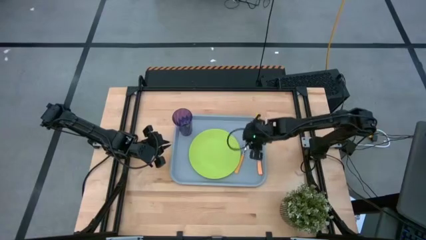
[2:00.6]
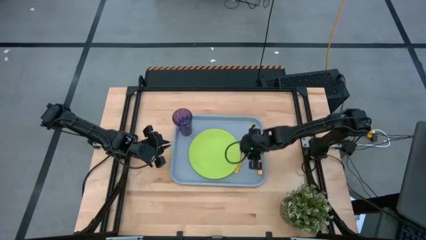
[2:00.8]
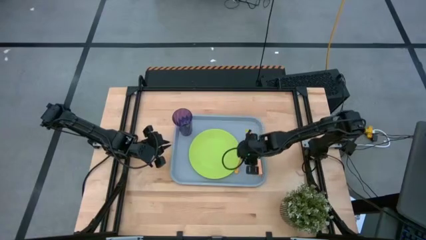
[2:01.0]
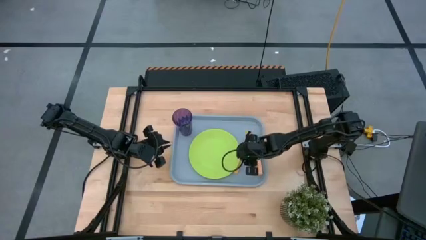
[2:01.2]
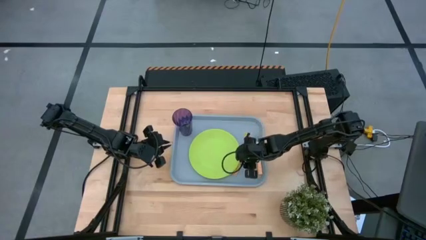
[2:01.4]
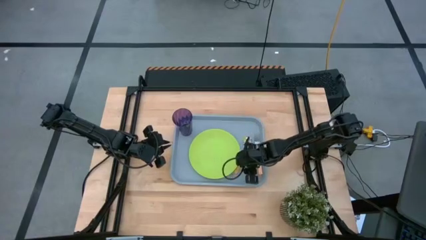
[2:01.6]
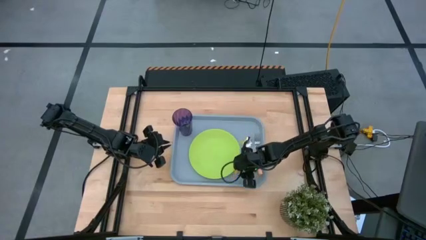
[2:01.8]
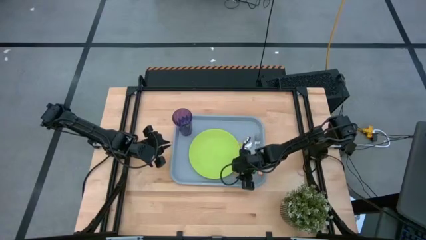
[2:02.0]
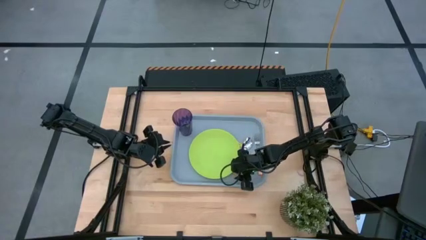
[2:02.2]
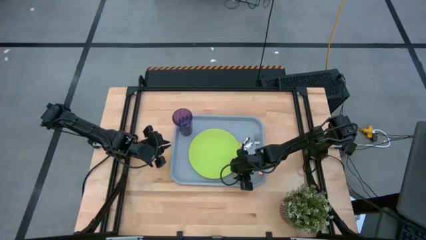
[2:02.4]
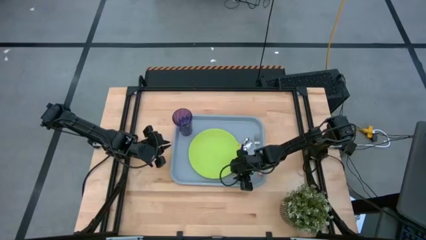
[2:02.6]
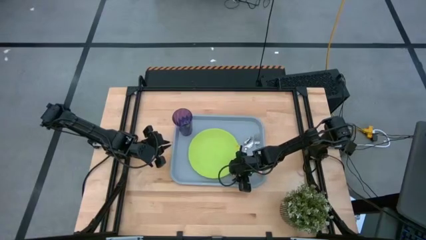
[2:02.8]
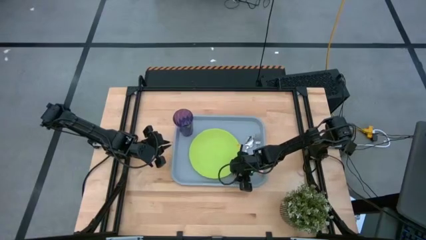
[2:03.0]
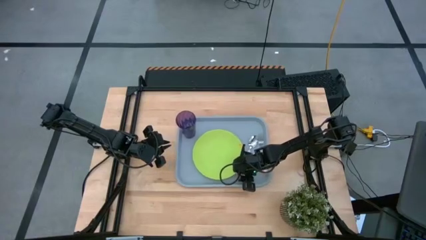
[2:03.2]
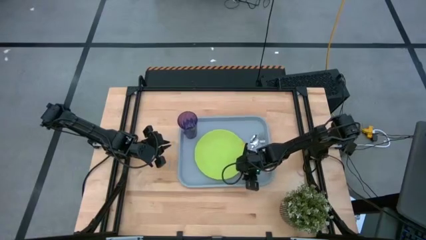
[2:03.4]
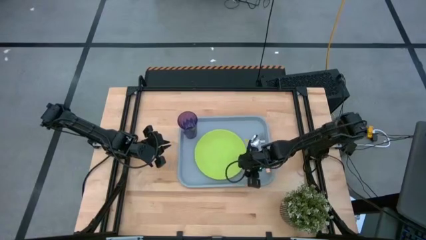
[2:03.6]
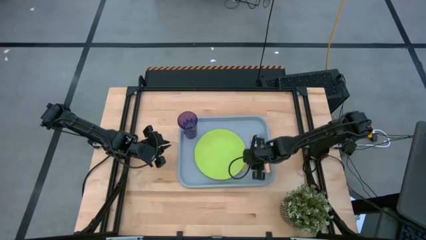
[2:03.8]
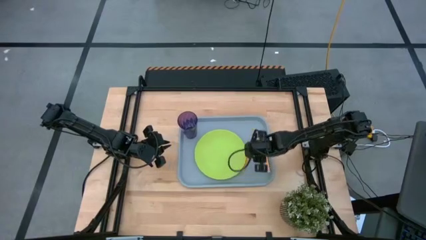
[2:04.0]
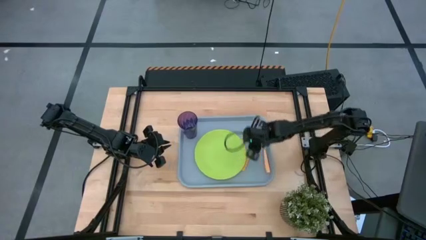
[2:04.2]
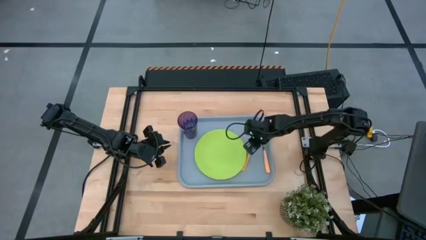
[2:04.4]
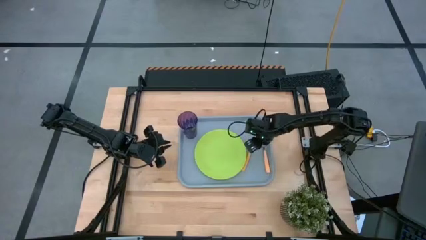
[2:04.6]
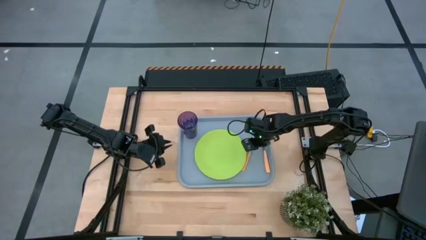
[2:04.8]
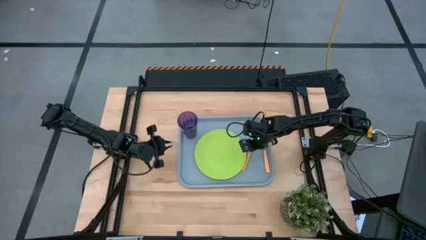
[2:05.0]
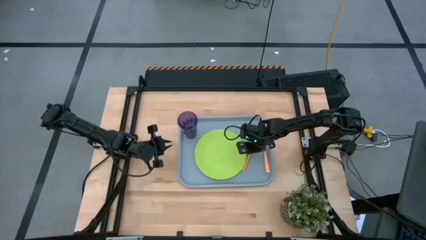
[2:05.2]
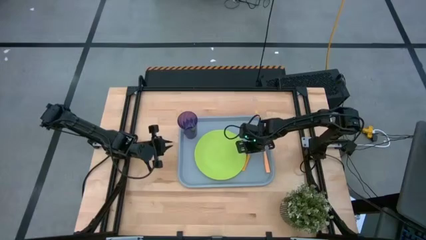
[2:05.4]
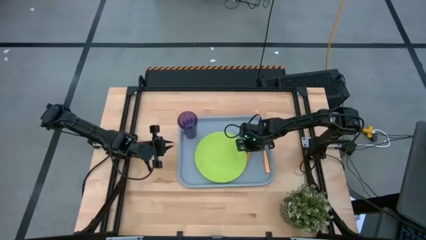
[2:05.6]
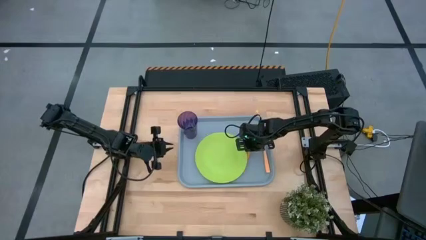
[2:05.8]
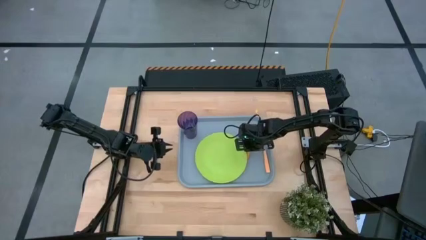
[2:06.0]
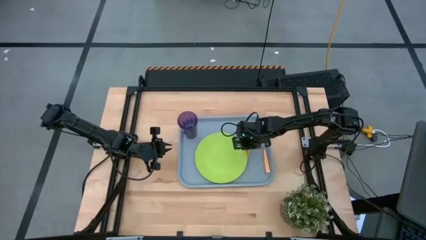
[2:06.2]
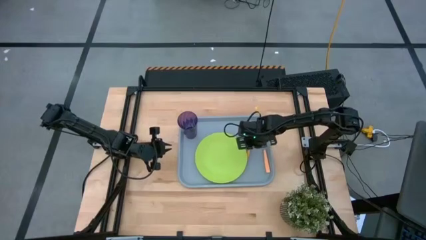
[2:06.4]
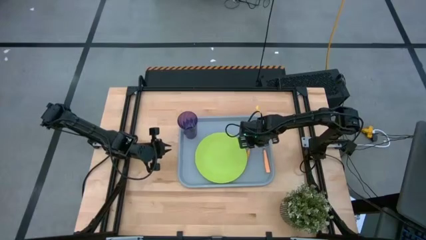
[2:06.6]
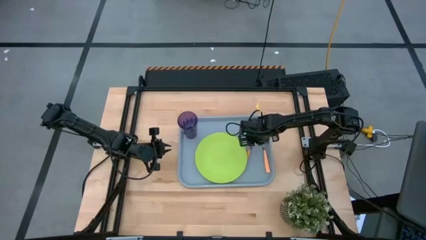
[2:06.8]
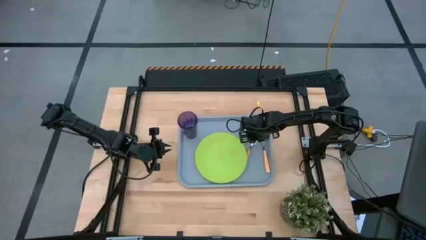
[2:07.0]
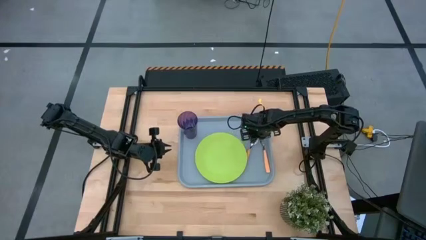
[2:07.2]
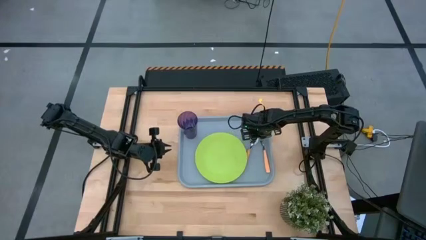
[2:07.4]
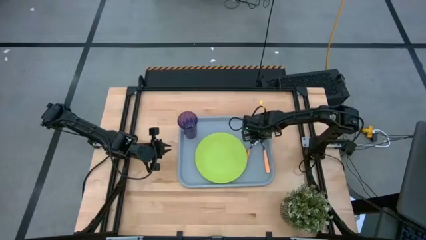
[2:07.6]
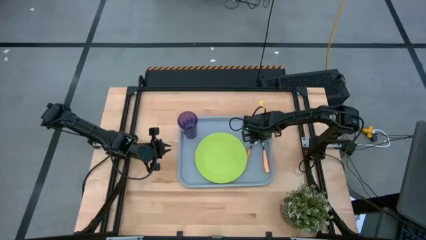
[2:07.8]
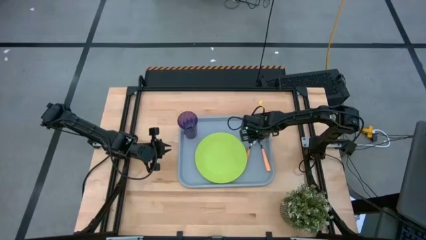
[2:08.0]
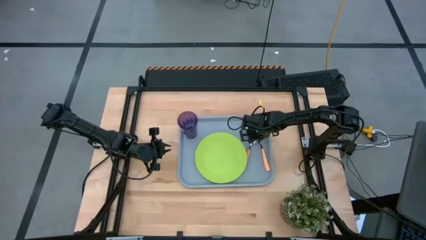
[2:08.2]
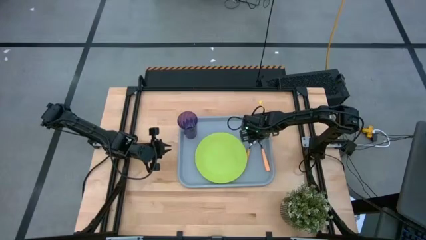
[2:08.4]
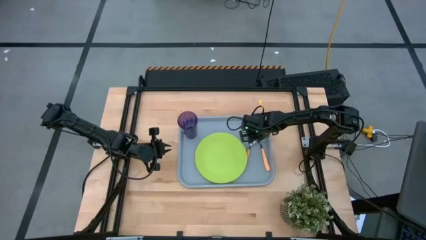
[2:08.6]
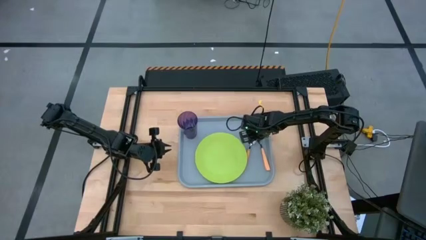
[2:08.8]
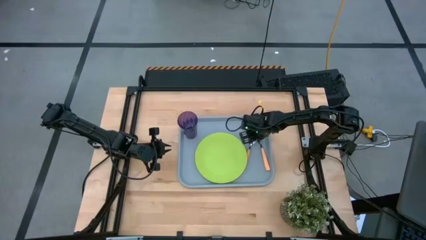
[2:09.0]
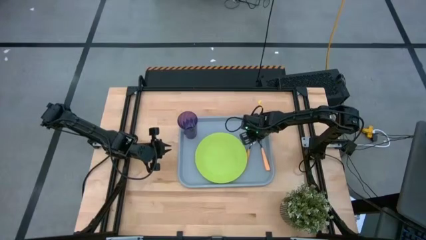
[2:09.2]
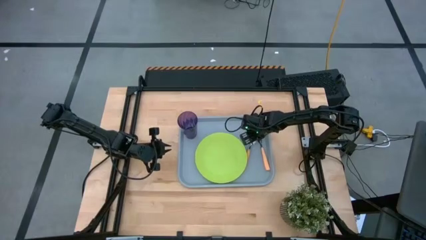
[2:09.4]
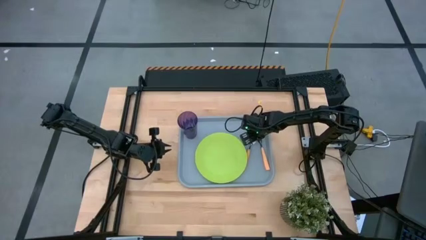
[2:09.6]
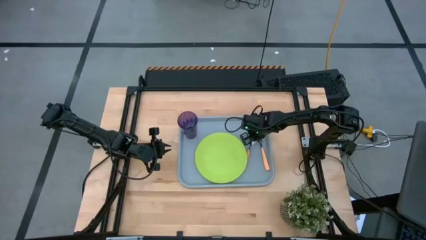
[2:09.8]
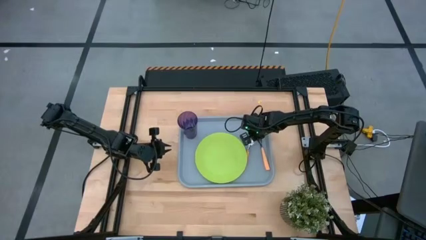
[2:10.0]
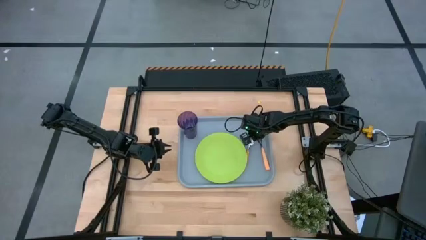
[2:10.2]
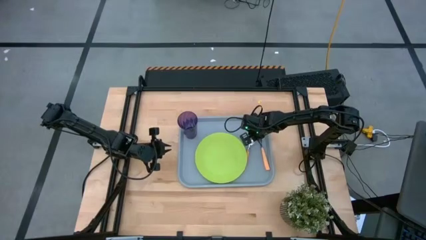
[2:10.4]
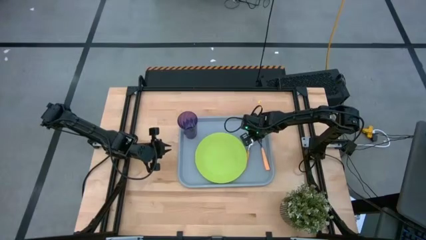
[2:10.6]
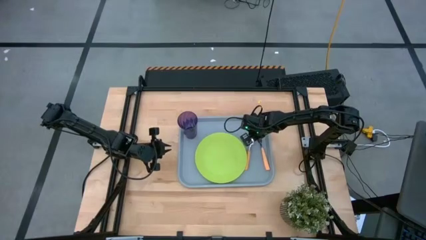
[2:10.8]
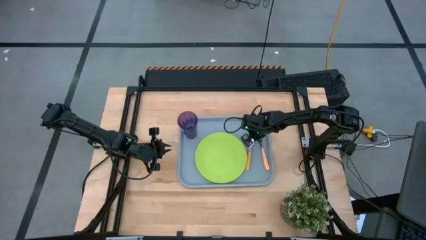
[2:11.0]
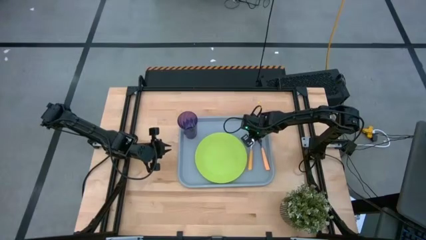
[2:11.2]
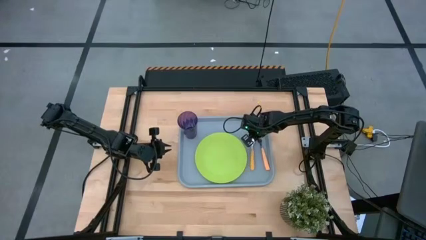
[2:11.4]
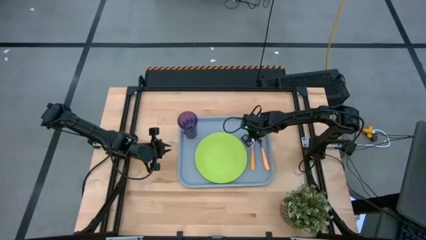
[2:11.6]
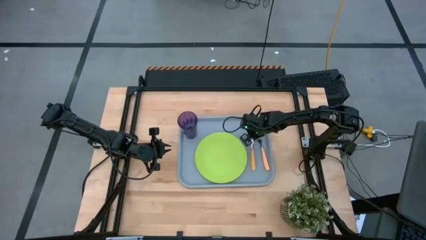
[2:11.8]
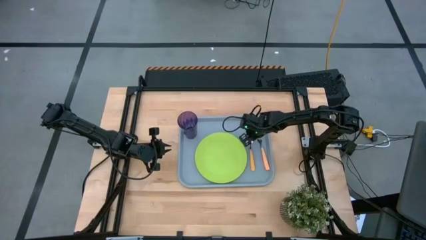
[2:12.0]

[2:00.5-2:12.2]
Task: Pick and place plate/cup/fork/spoon on tray
Adjust the yellow spoon on the gray serving tray
